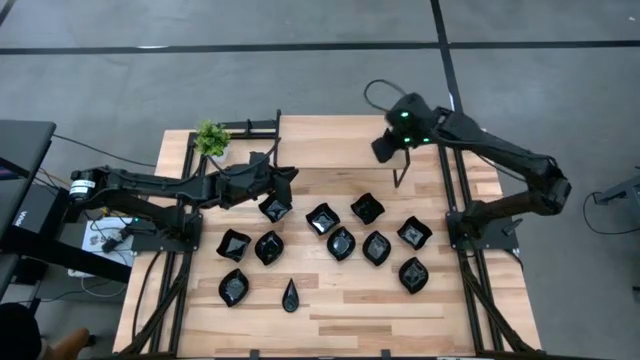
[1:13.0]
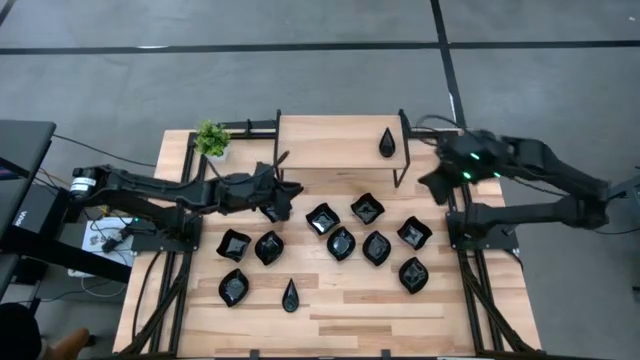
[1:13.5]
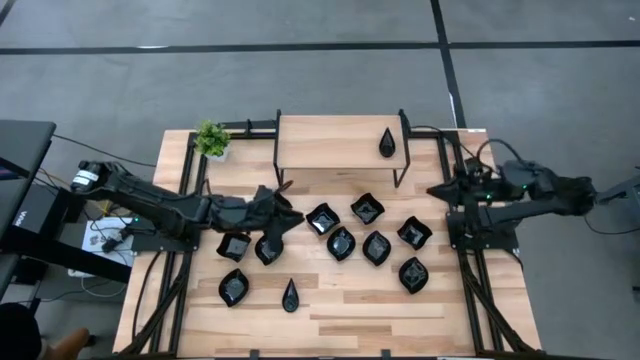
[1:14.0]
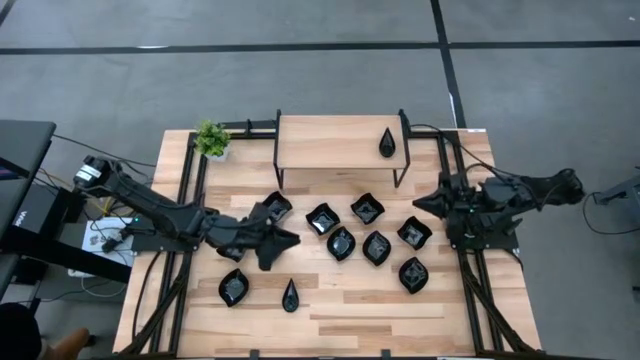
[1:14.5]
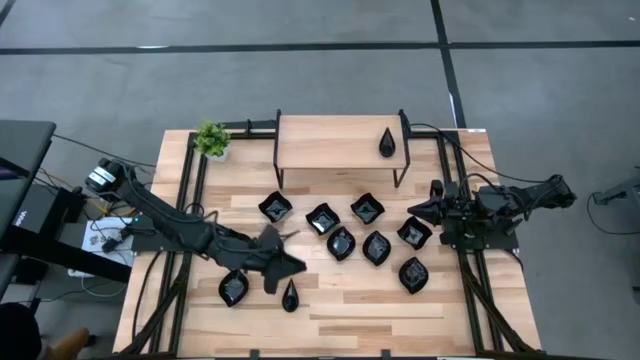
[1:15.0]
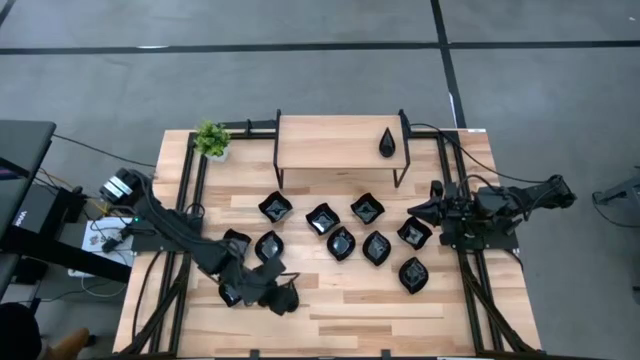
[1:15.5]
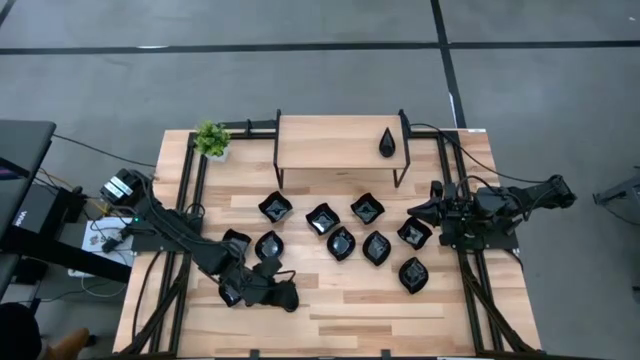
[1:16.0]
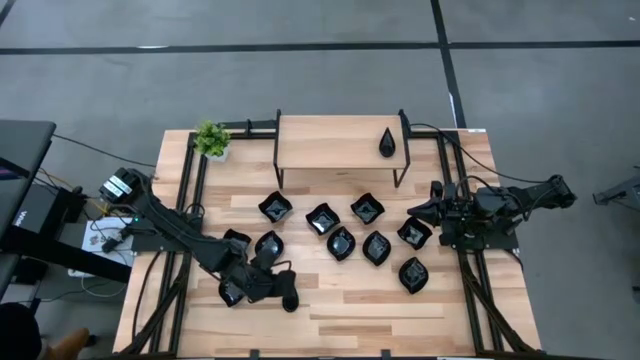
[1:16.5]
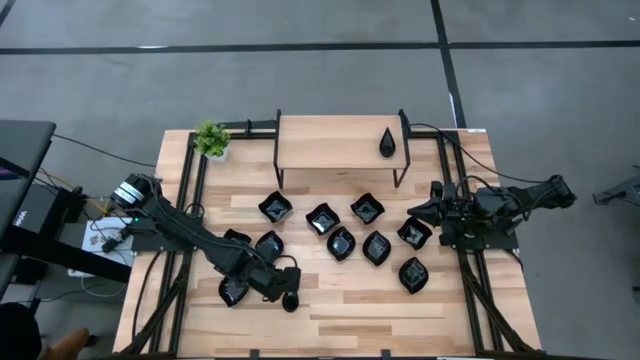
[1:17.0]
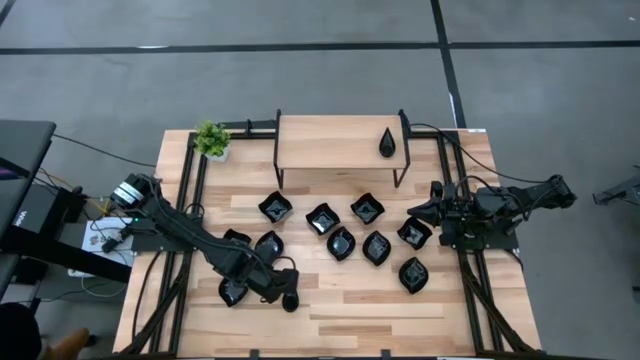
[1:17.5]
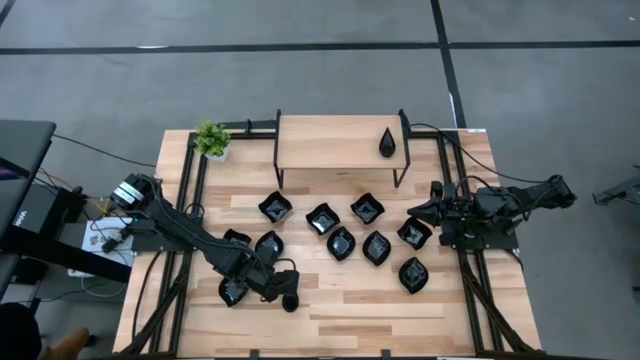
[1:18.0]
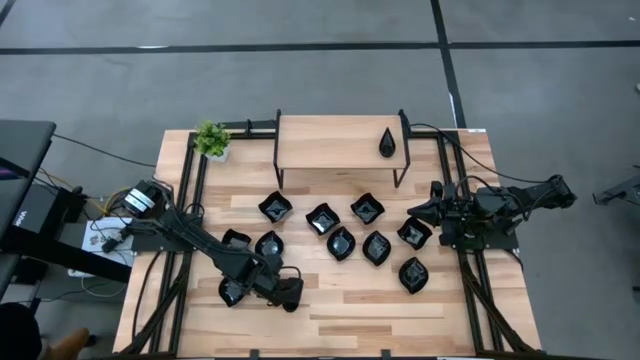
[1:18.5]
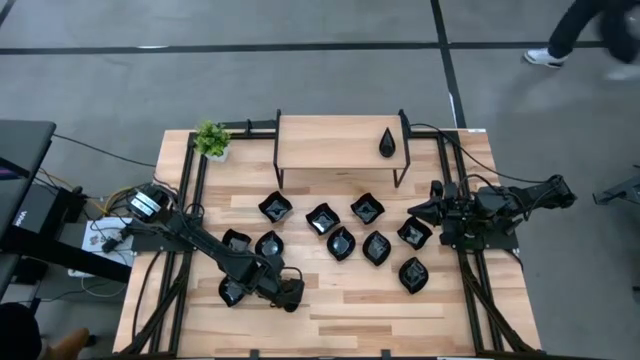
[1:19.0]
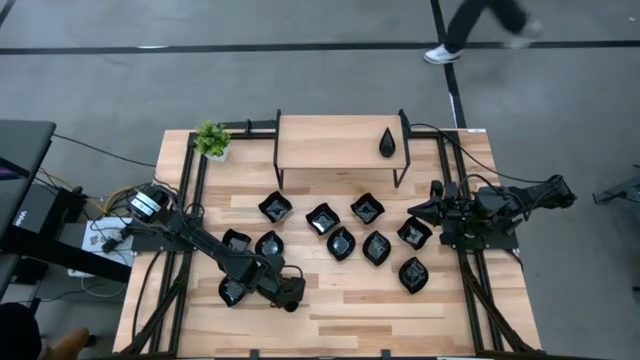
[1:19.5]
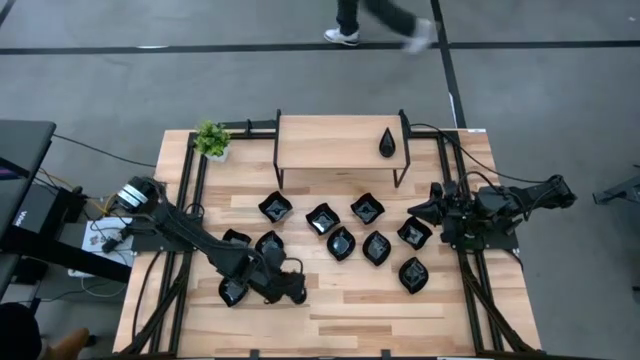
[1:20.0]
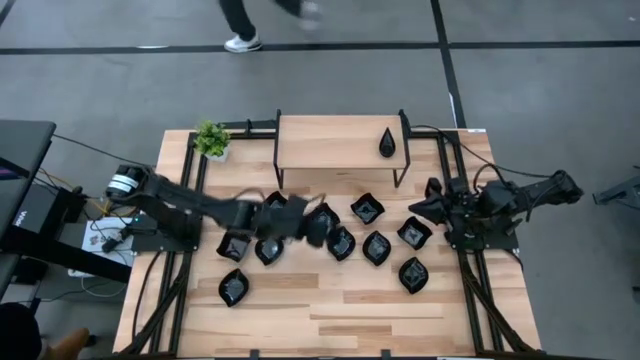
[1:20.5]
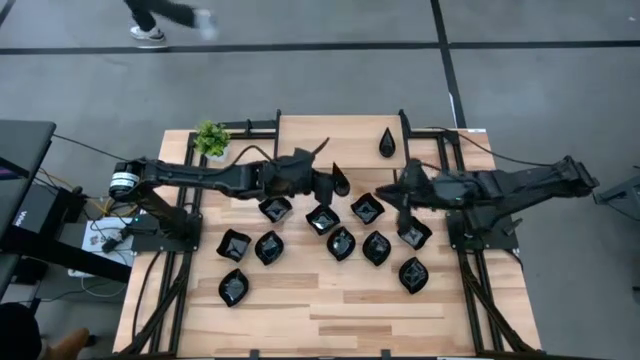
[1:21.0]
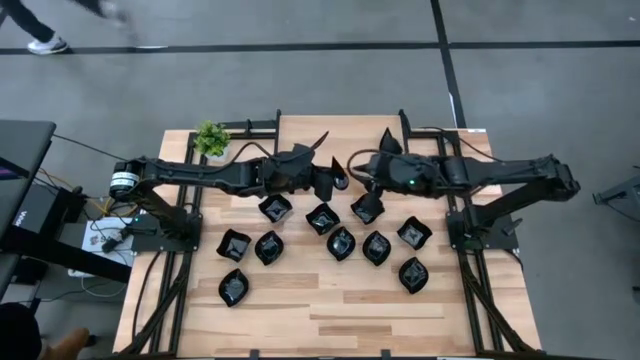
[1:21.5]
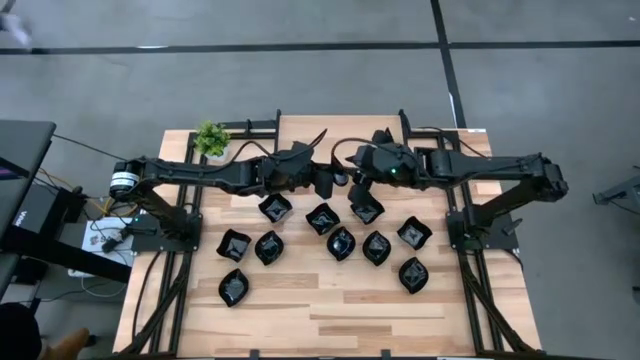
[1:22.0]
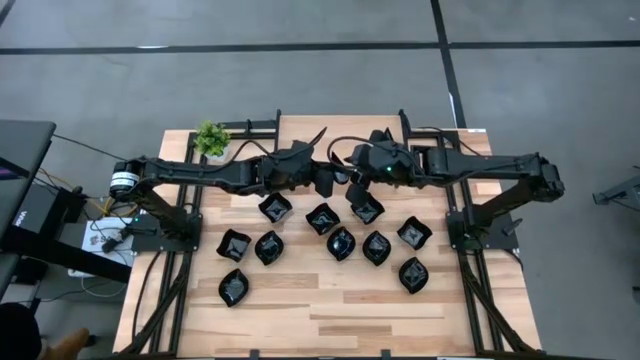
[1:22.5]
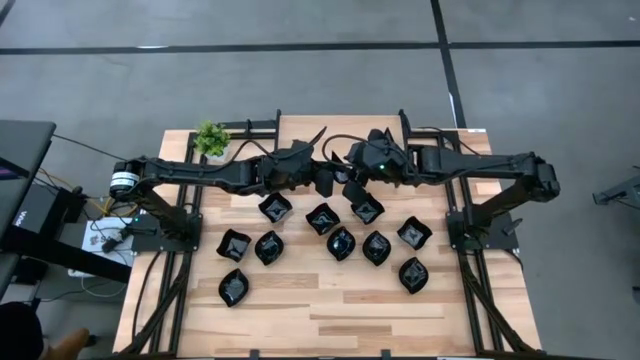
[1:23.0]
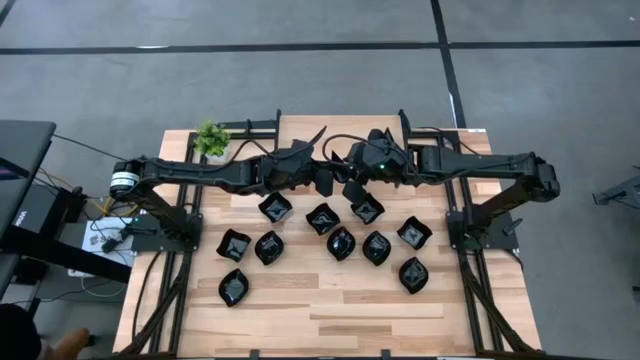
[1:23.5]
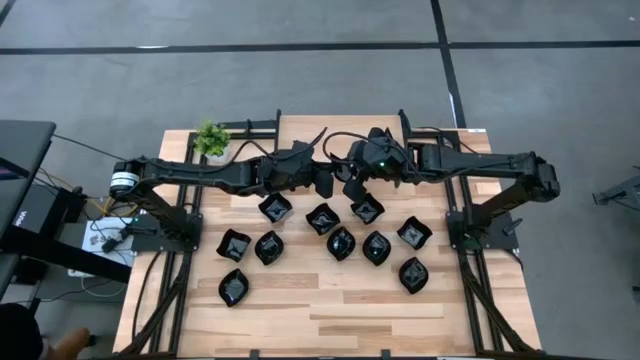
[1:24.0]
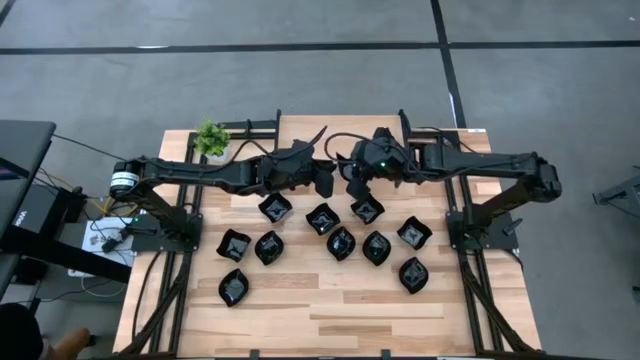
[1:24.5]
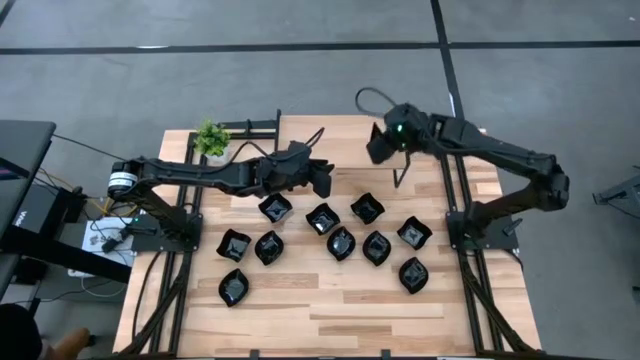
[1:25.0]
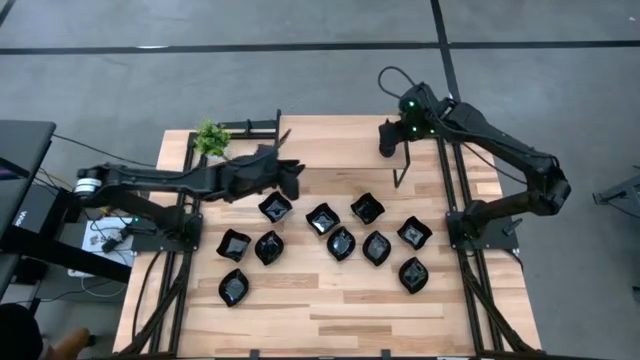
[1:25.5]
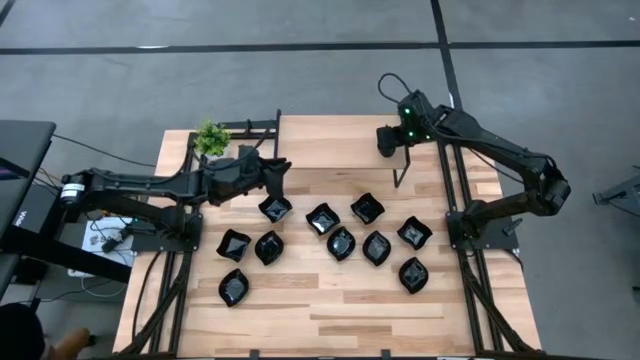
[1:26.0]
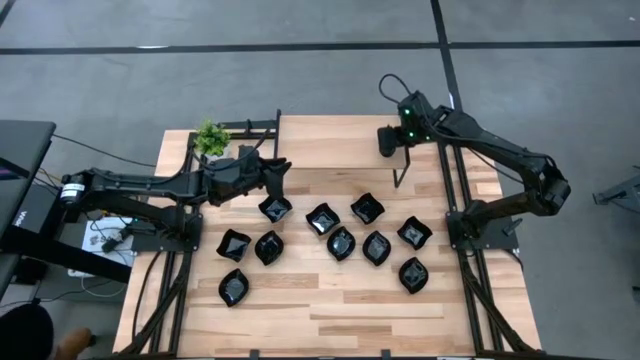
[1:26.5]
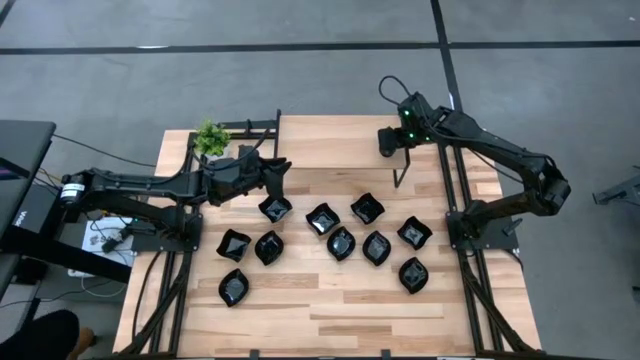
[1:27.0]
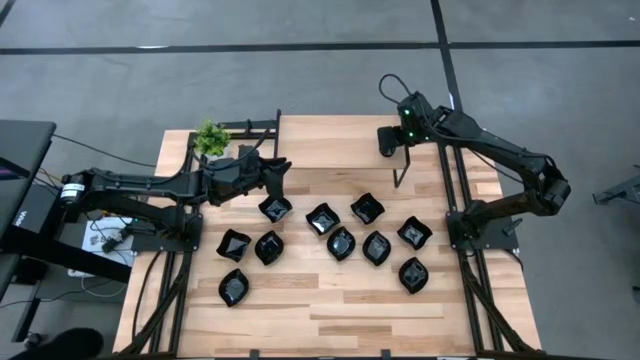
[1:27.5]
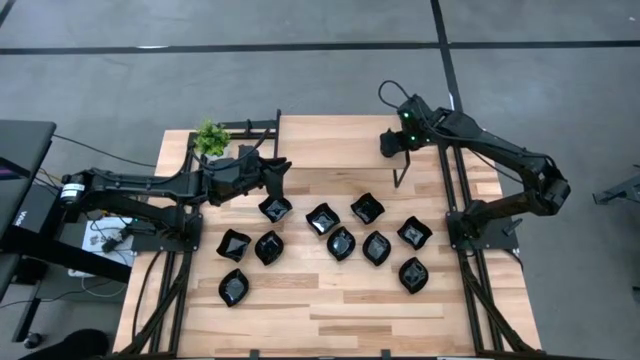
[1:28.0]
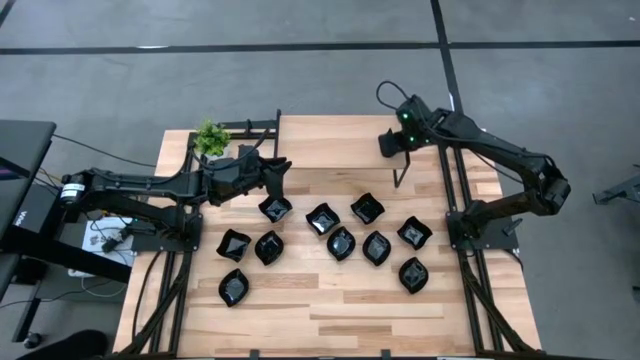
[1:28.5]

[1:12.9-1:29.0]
Task: Pick & Place Mini shaped plates
Stack the black plate on top of the black plate on the shelf

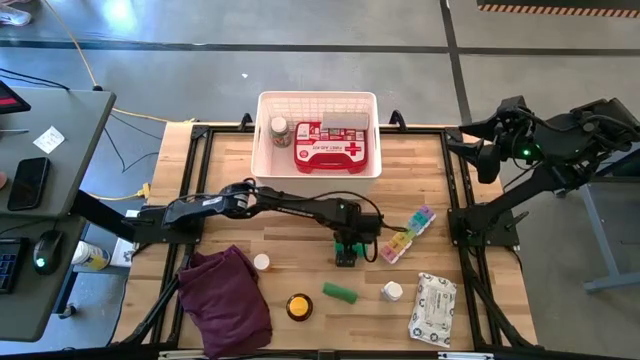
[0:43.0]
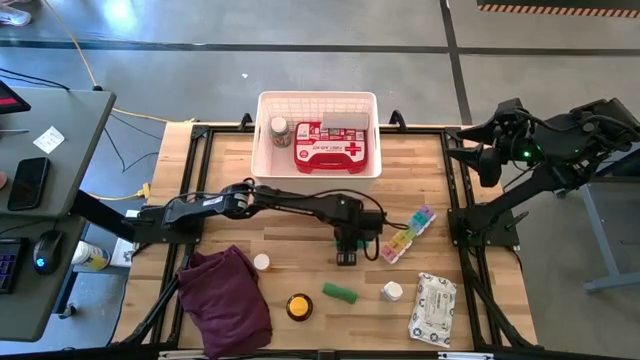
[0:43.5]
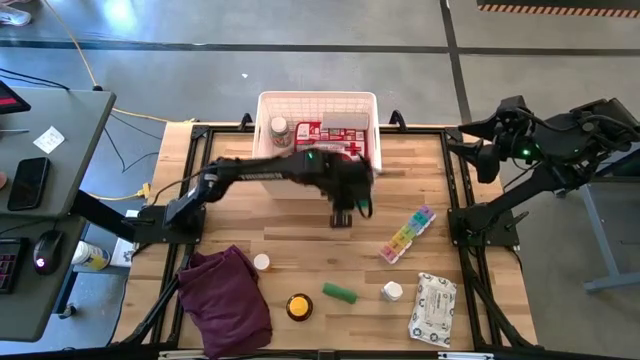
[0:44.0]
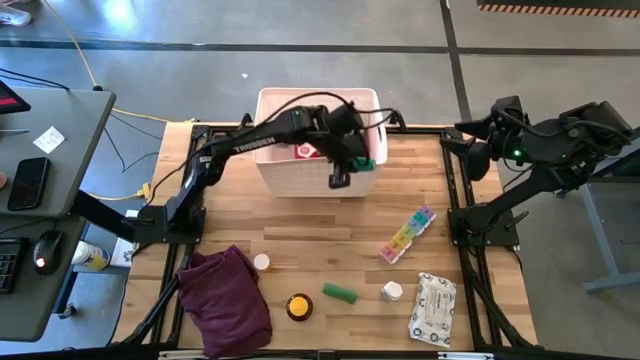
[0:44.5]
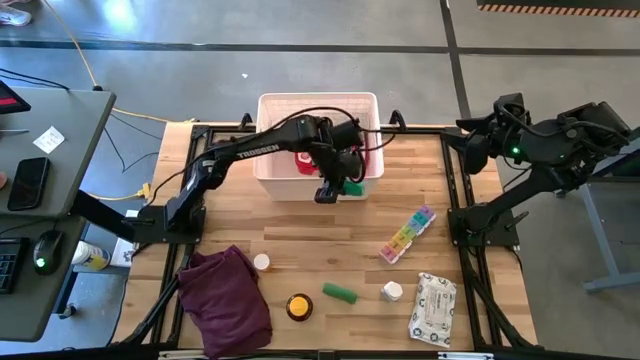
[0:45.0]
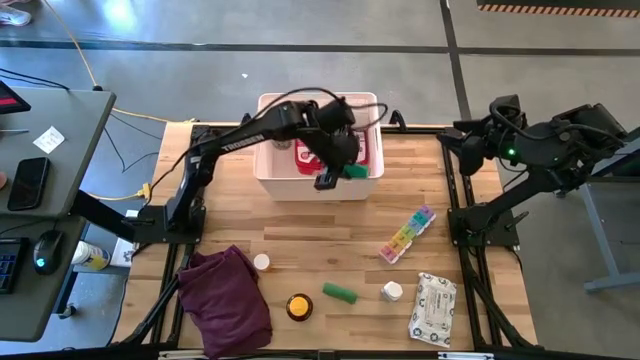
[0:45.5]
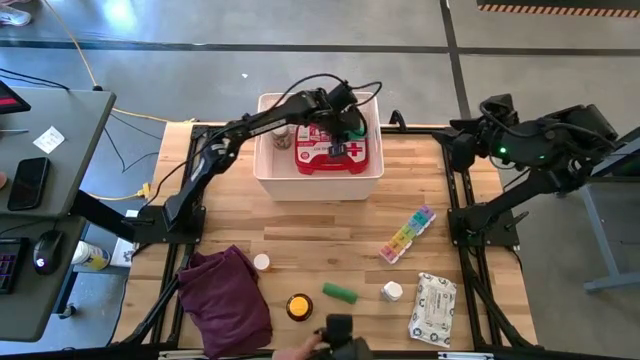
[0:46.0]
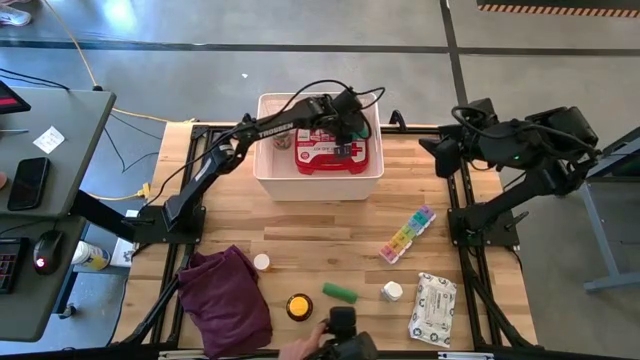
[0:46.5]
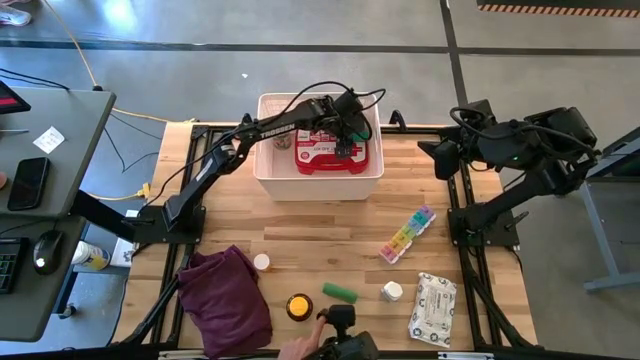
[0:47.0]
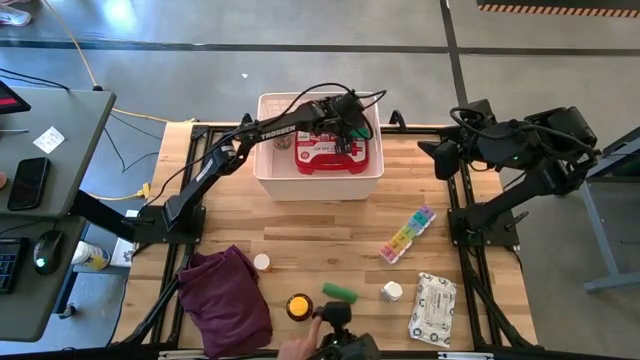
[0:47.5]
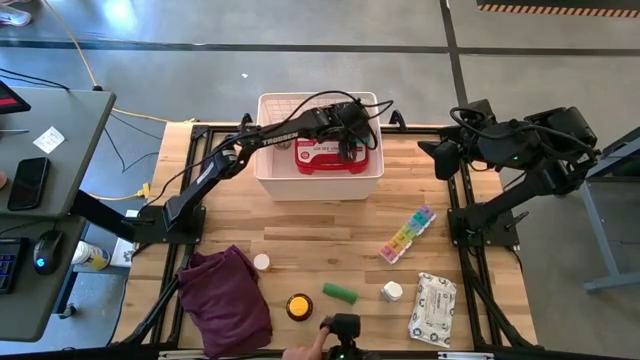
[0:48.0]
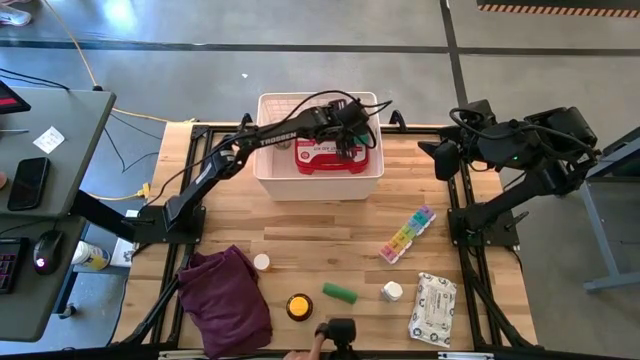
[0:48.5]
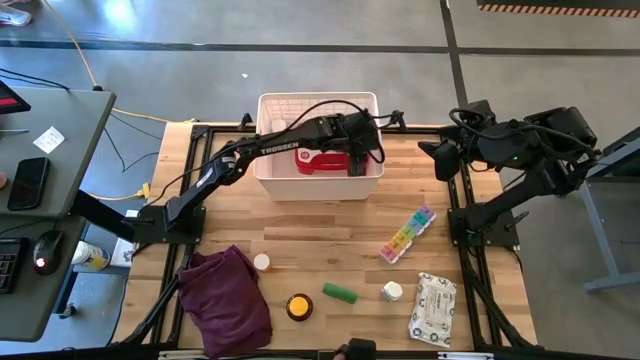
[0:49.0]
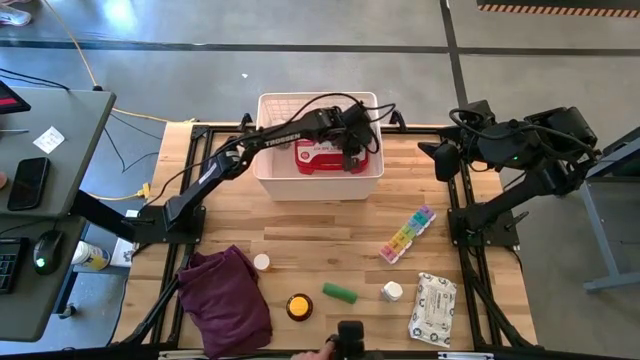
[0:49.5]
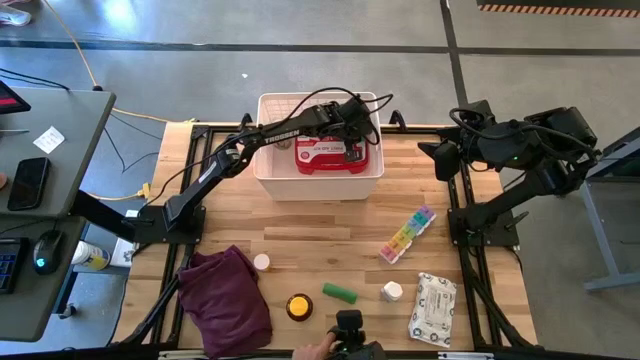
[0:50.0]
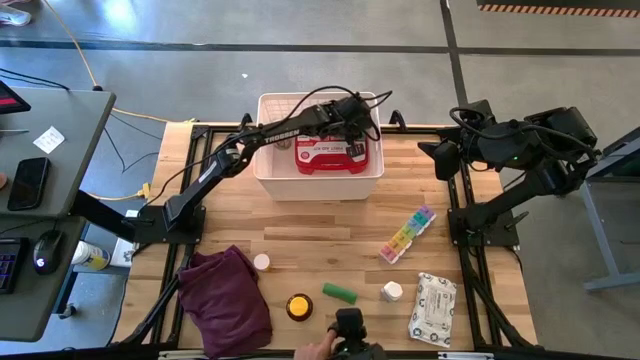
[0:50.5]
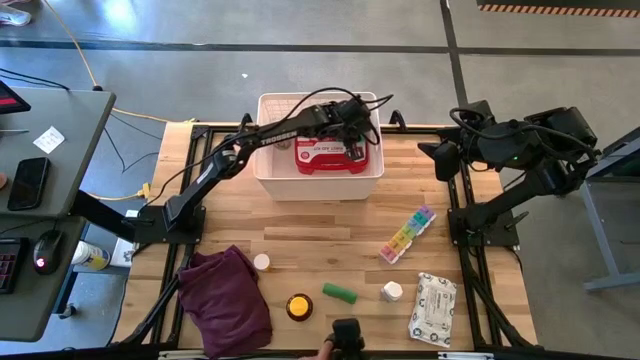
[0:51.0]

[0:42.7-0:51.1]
Task: Pick & place medical supplies in basket/bin
Put the blue bandage into the white bin
